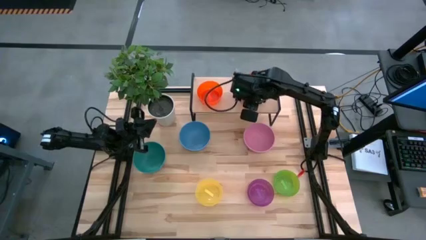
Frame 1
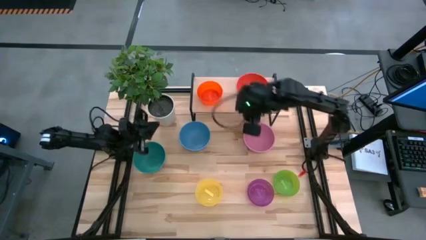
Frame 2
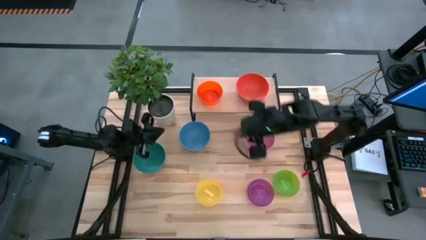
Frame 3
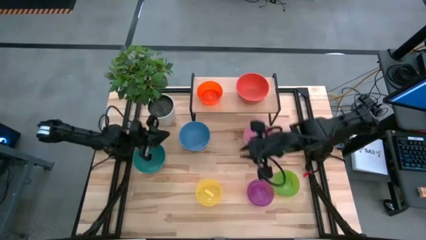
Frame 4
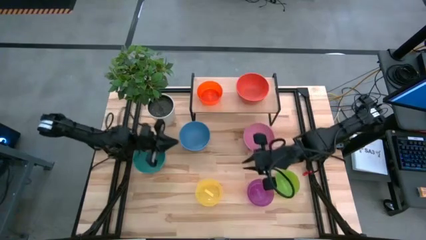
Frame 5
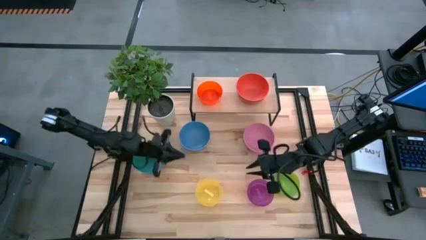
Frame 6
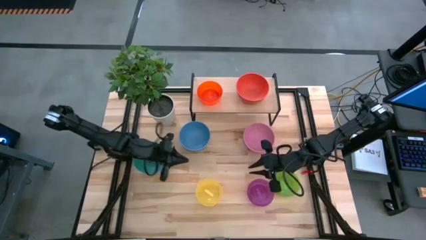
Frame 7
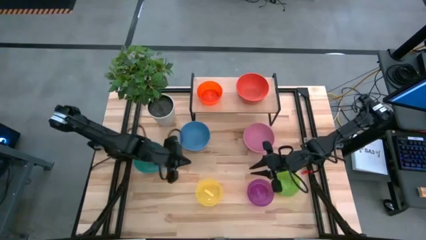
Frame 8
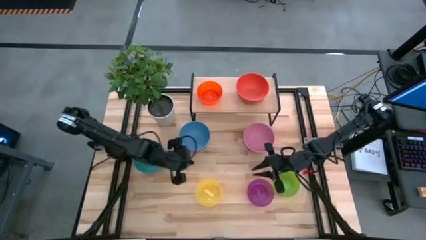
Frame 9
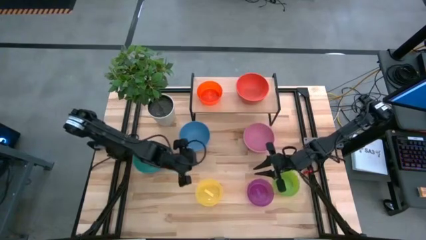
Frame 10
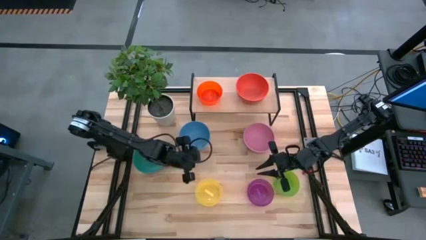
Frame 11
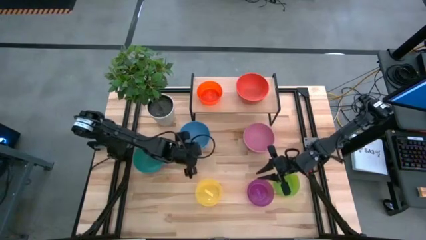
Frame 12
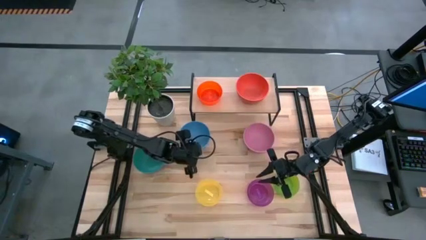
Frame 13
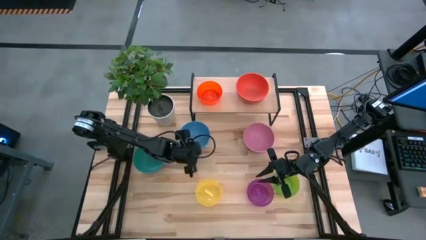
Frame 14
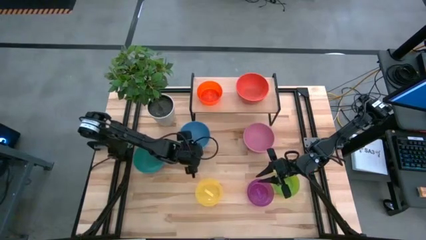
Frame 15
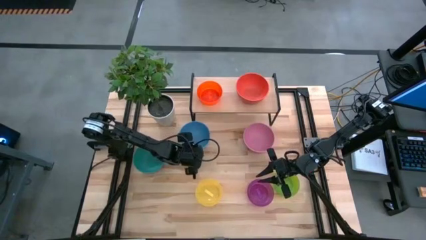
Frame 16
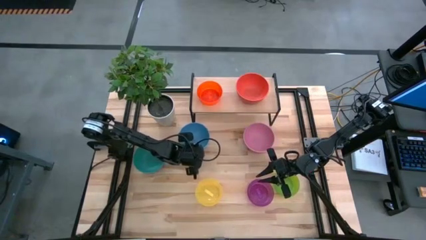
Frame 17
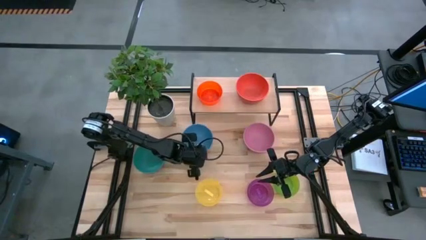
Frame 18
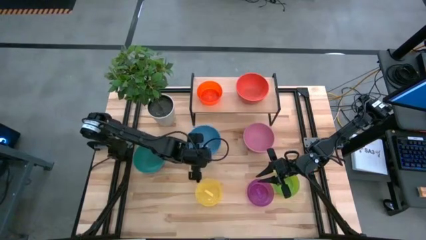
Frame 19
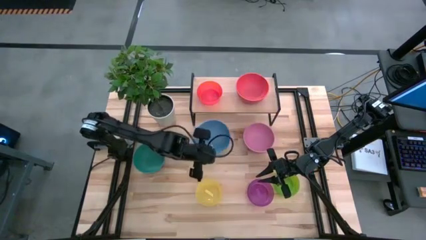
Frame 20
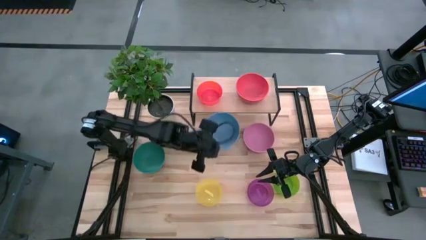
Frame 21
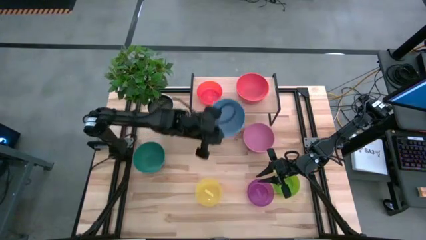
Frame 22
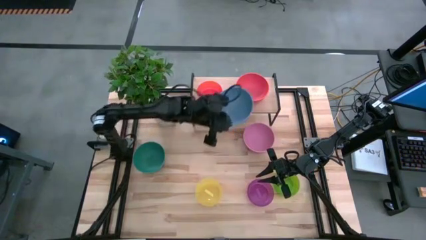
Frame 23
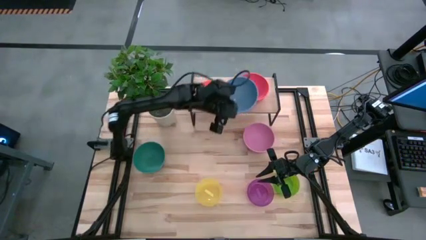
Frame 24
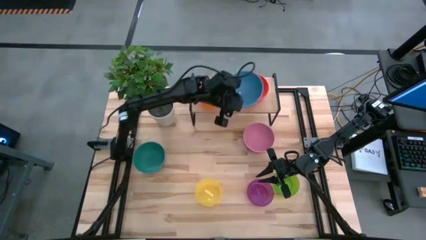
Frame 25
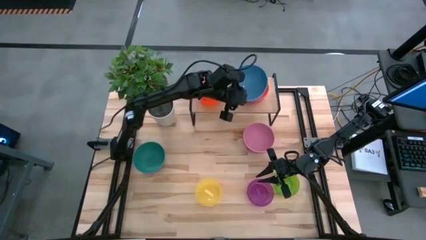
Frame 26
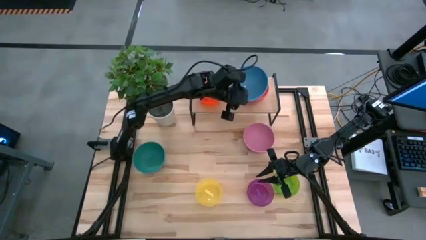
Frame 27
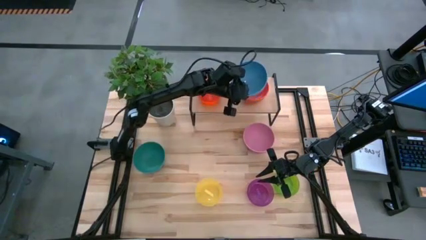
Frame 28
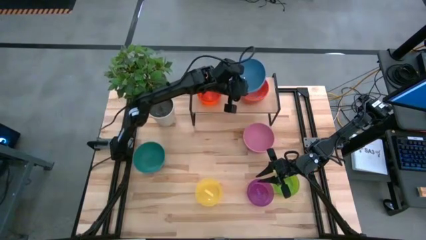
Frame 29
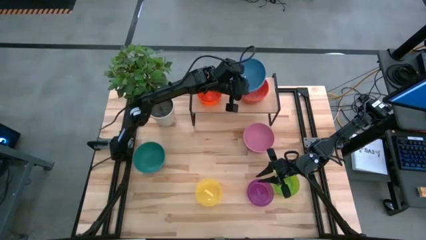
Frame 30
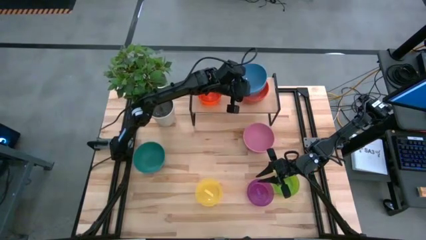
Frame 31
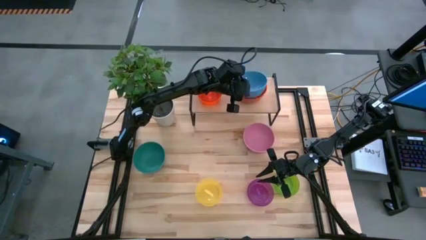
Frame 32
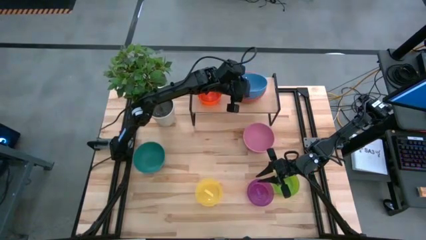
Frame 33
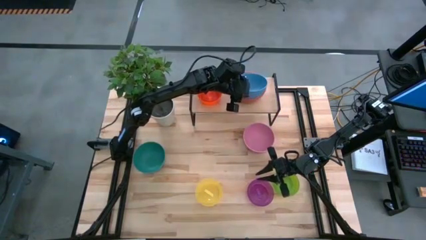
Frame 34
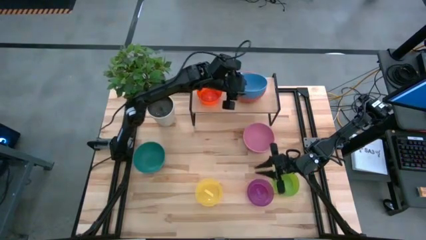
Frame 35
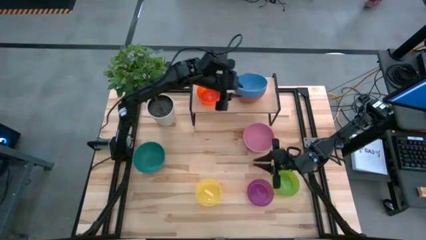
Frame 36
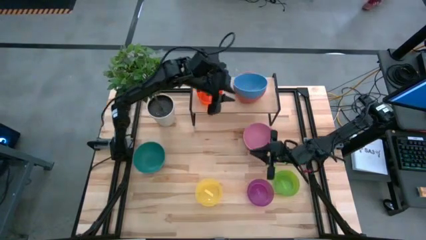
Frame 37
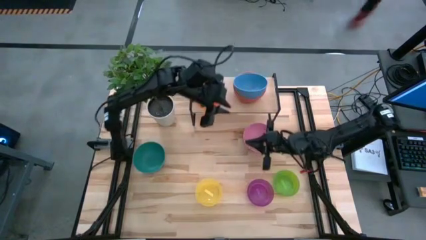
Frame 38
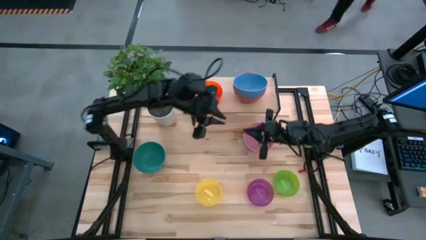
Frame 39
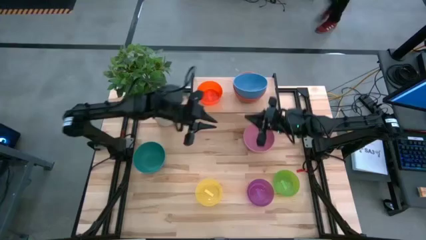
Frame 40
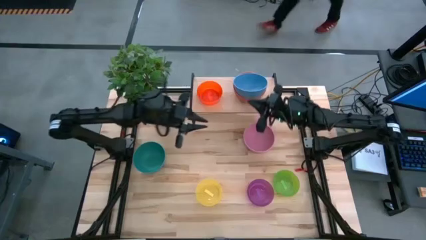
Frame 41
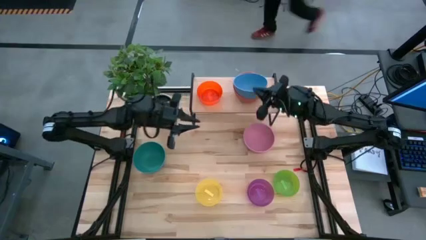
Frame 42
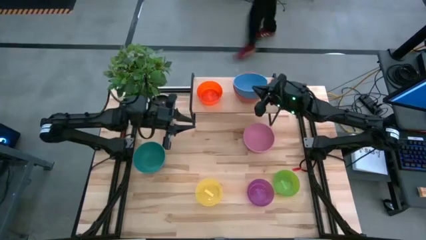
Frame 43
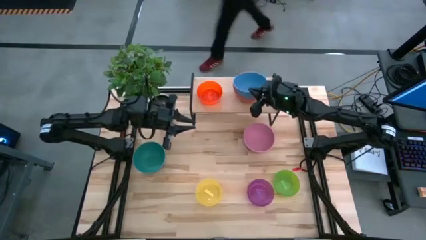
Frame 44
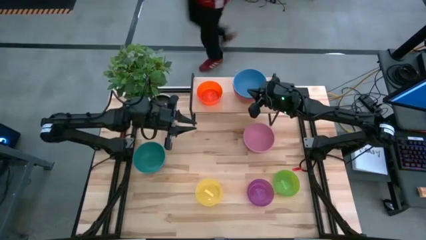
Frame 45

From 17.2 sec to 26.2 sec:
Task: Place and stack bowls onto a shelf
Stack the blue bowl into the orange bowl on the shelf

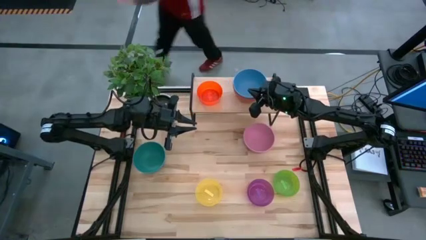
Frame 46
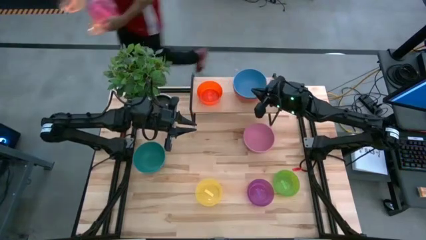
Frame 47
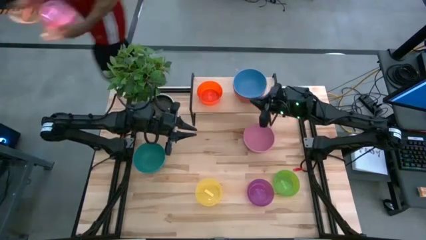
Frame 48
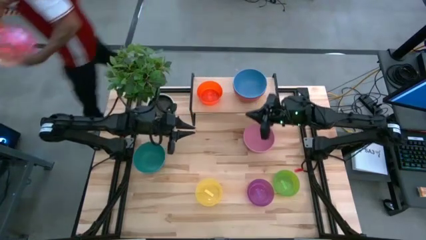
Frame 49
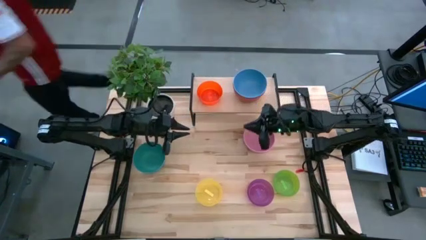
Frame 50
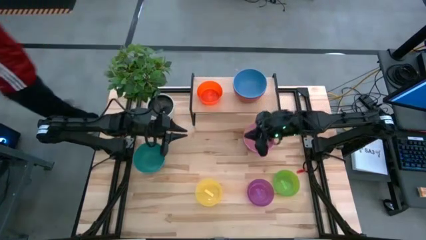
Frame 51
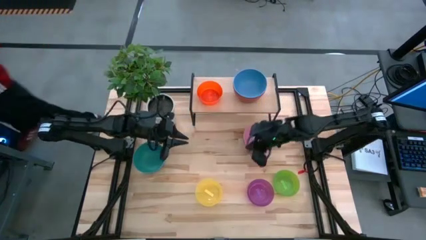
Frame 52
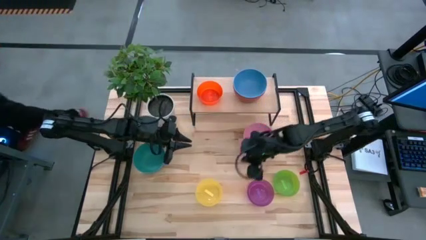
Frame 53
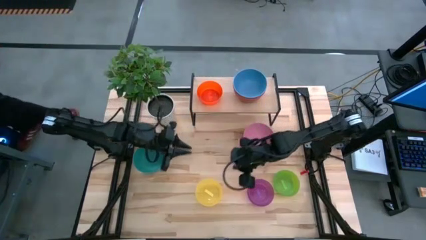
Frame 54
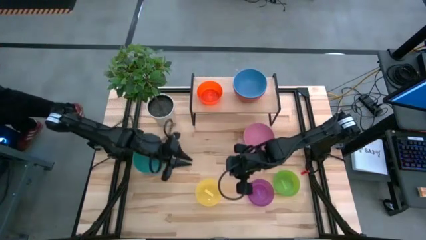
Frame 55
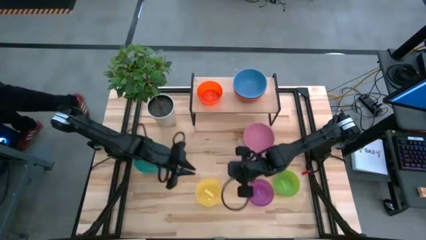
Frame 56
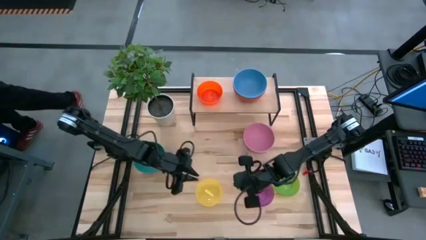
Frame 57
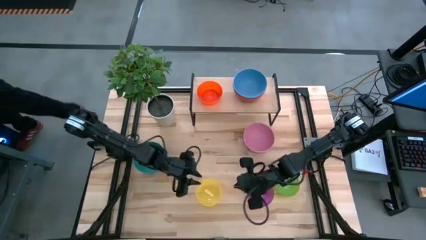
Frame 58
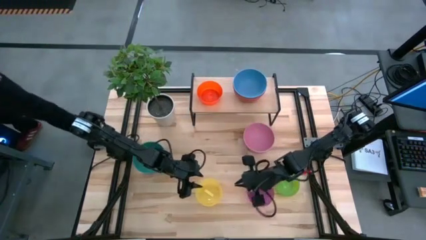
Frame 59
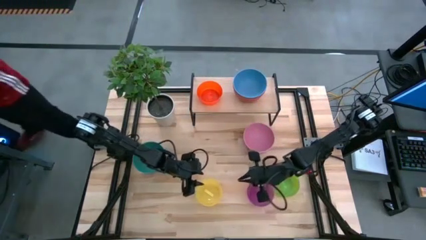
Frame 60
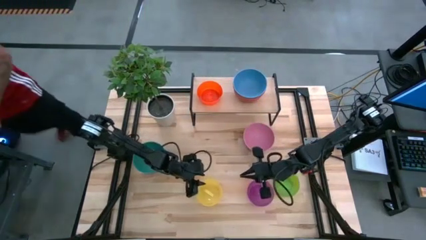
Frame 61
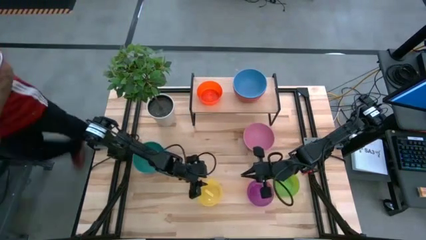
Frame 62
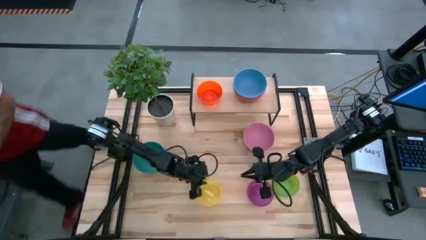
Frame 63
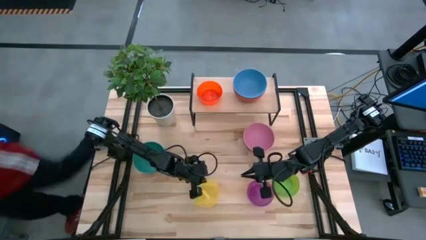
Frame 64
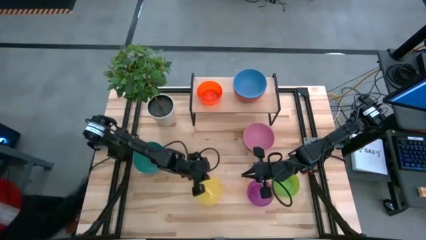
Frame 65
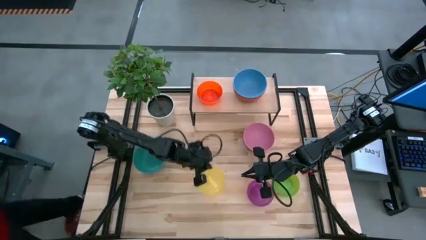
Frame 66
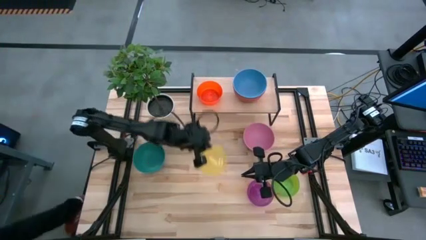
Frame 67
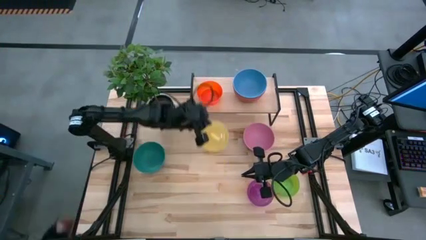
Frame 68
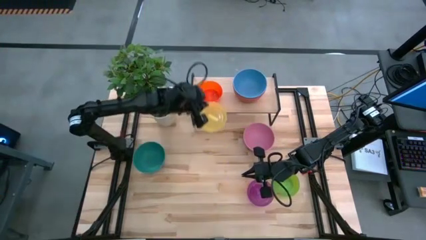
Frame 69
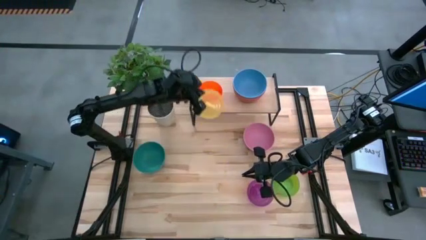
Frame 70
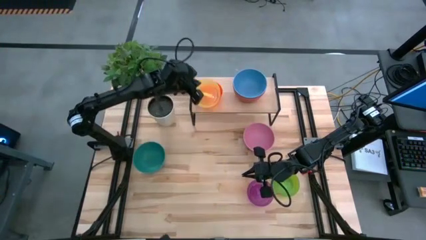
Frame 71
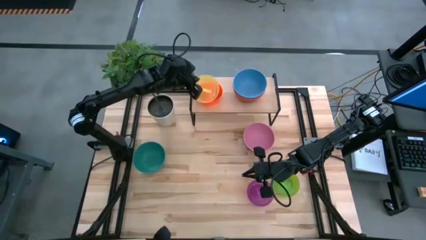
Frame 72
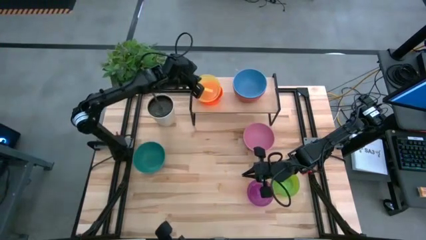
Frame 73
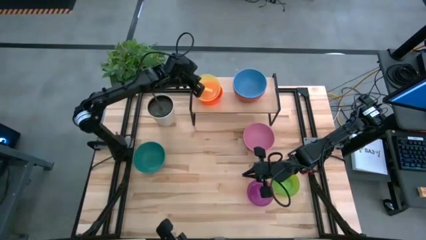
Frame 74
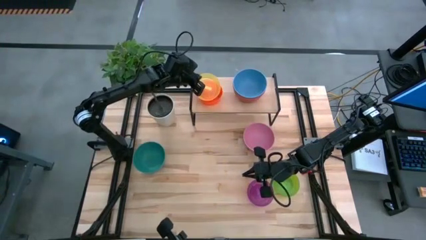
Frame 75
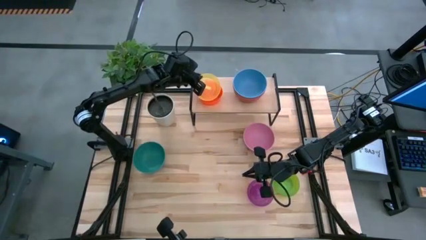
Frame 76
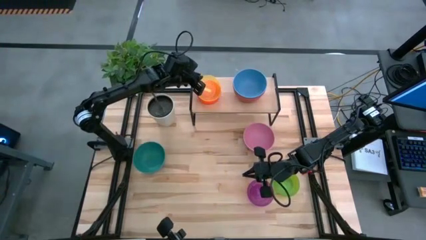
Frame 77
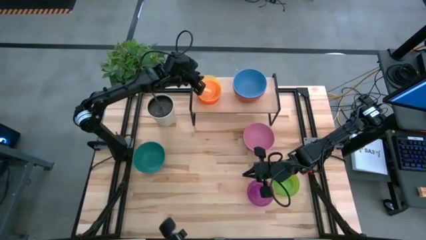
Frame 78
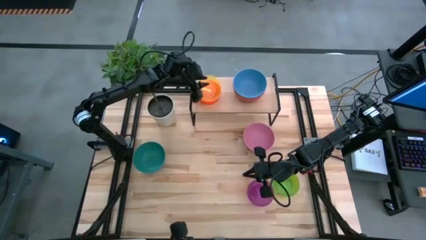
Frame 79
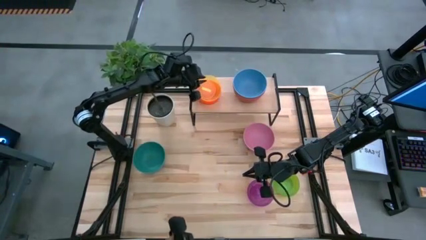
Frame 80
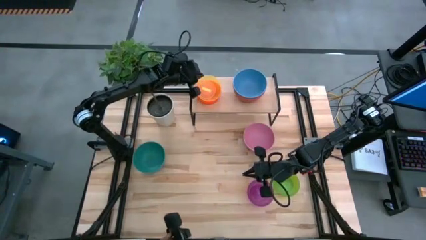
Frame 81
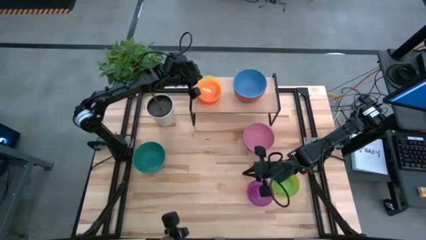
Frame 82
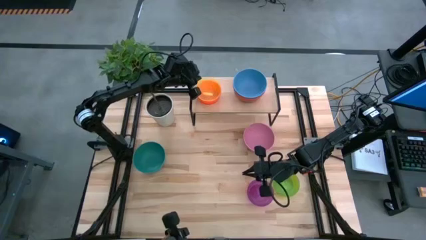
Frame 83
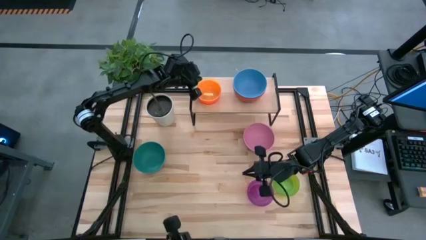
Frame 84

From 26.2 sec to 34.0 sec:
Stack the transparent yellow bowl into the transparent orange bowl on the shelf

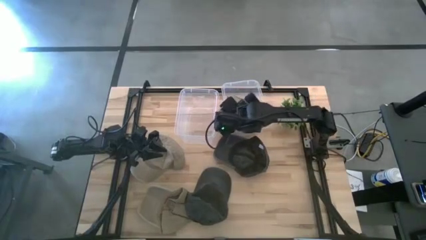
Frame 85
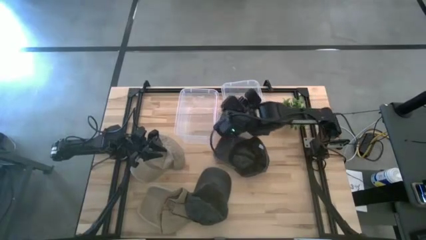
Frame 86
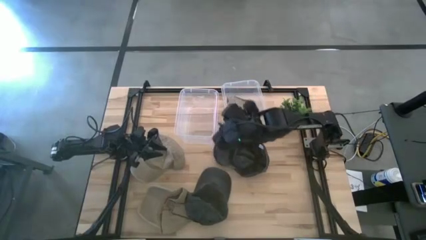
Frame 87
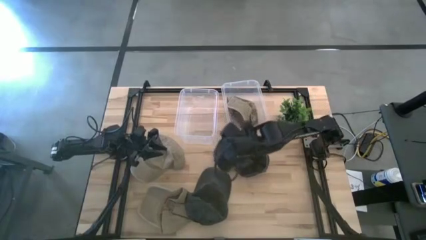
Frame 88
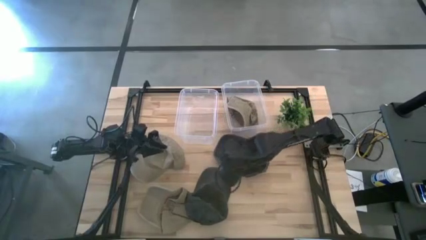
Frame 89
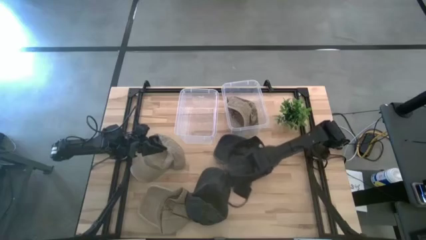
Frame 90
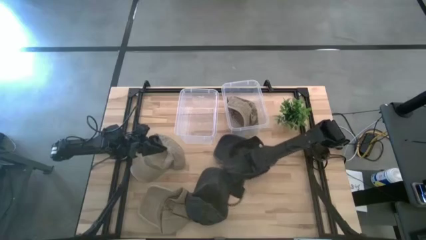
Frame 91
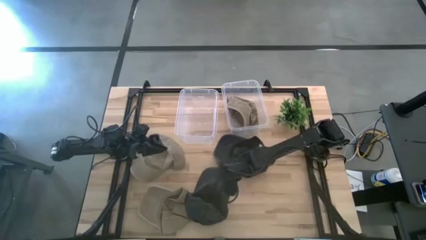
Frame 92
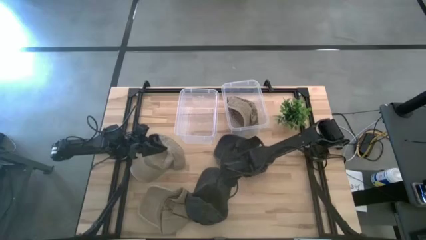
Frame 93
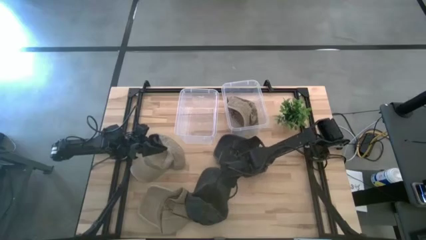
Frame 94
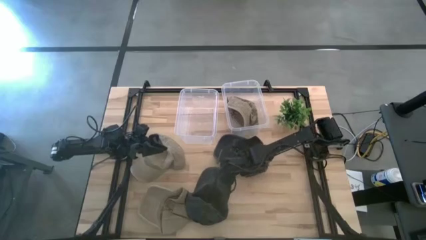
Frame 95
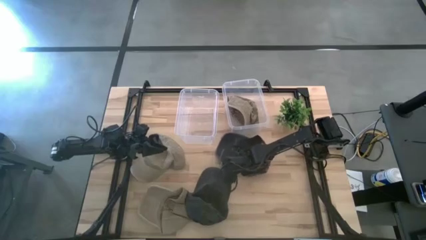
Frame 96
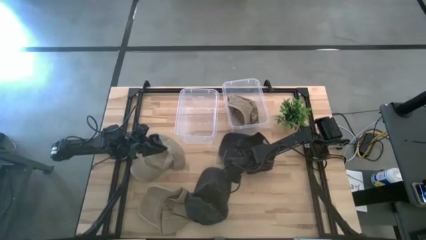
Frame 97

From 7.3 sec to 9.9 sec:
Task: Pick & Place hat
Put the top black hat into the left transparent bin
